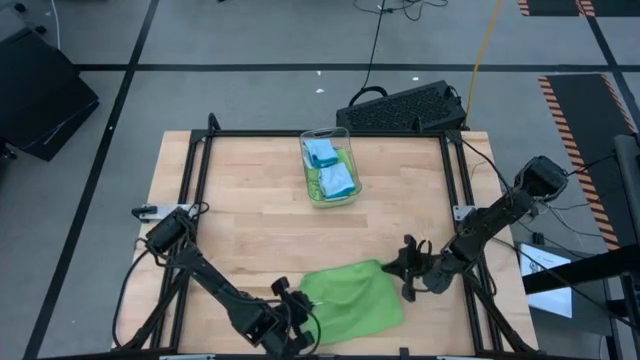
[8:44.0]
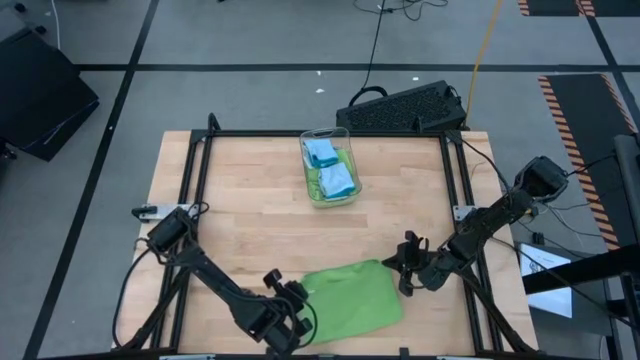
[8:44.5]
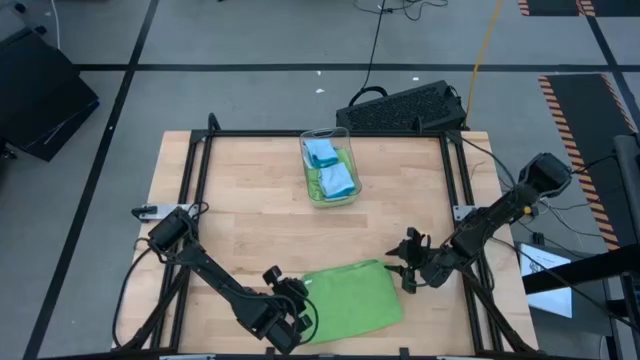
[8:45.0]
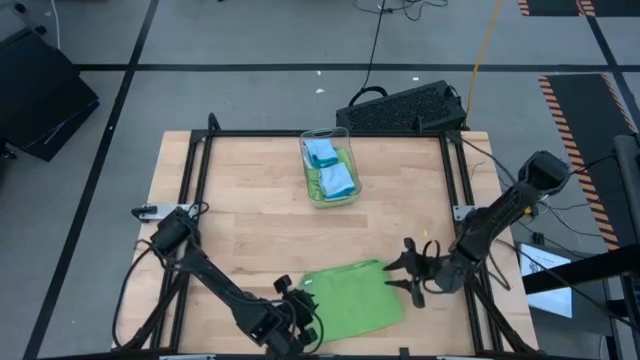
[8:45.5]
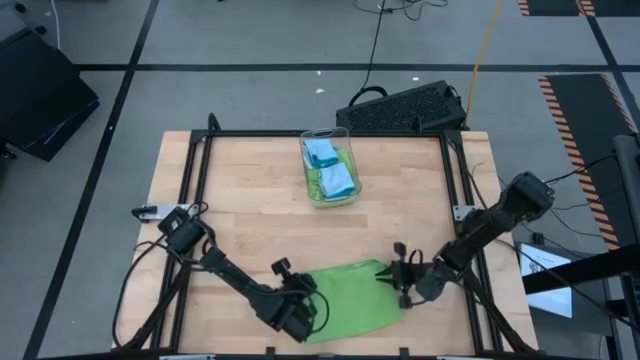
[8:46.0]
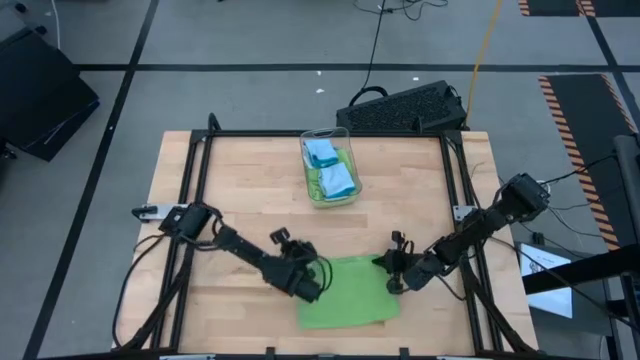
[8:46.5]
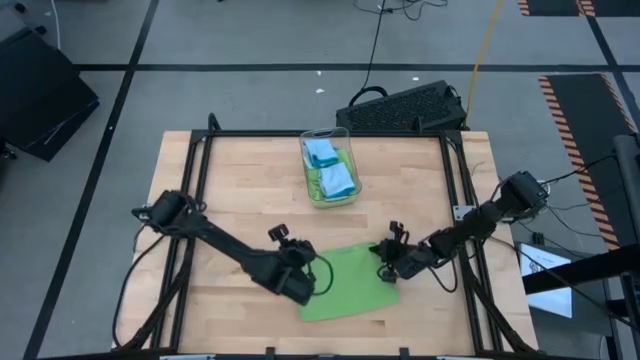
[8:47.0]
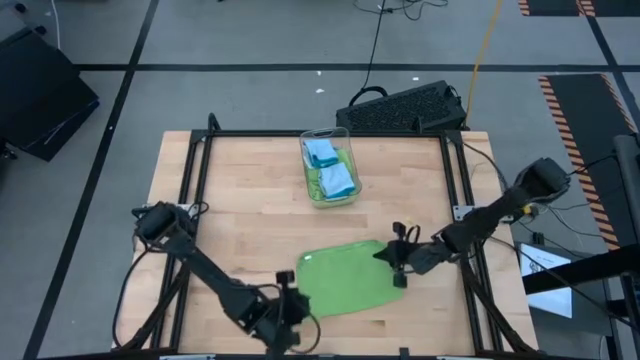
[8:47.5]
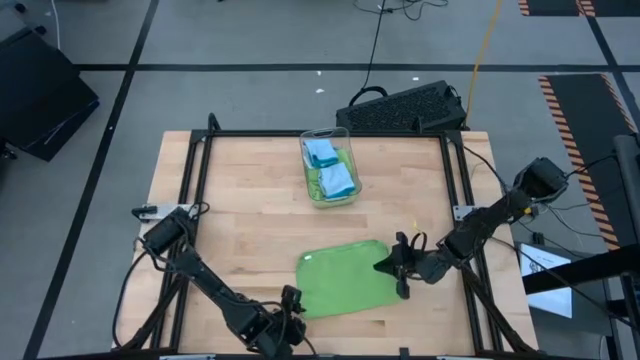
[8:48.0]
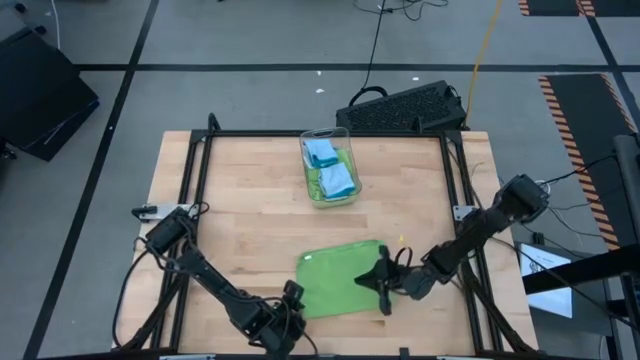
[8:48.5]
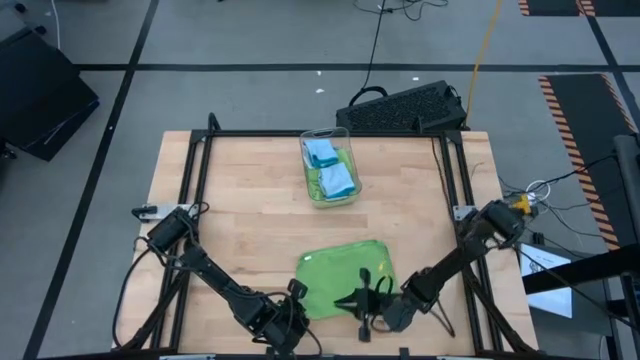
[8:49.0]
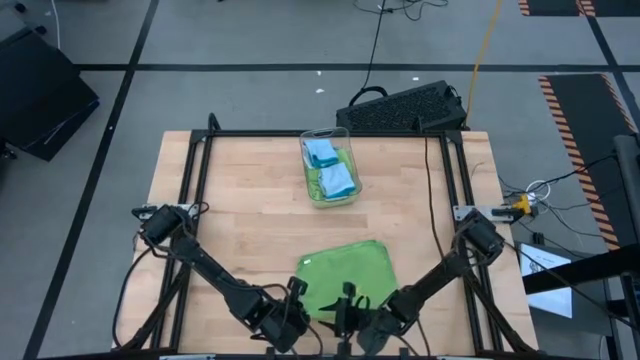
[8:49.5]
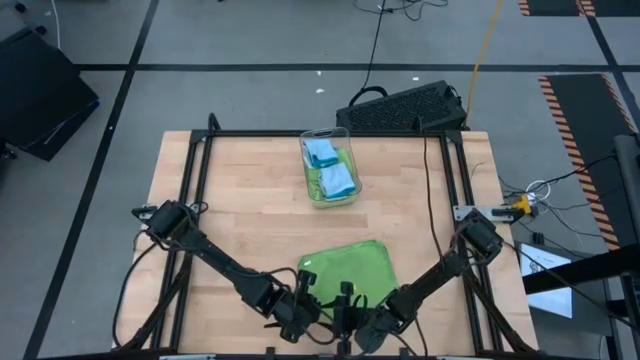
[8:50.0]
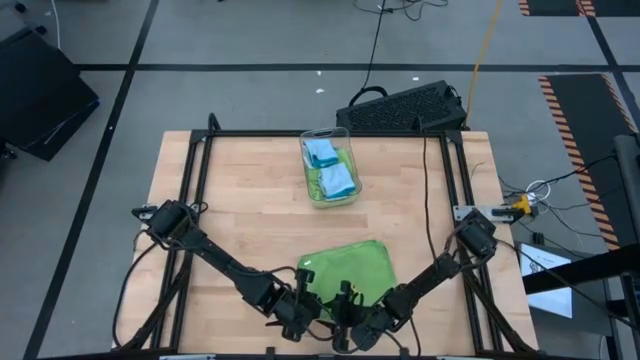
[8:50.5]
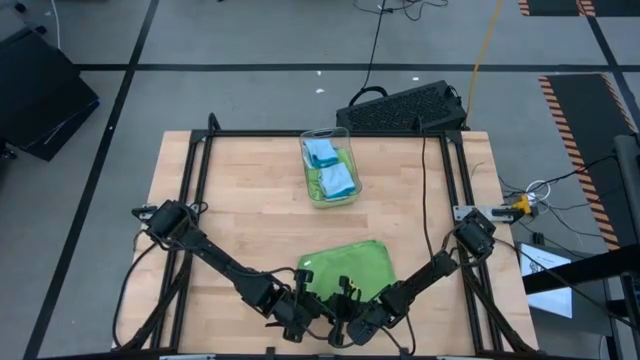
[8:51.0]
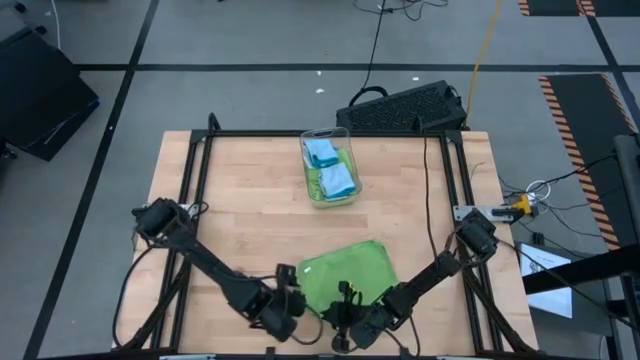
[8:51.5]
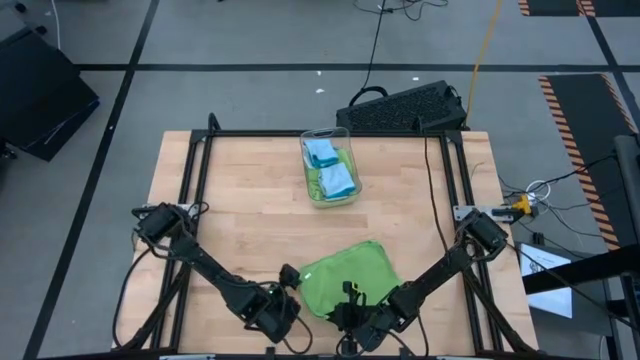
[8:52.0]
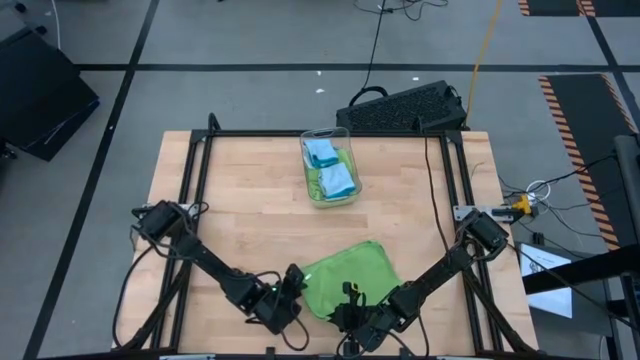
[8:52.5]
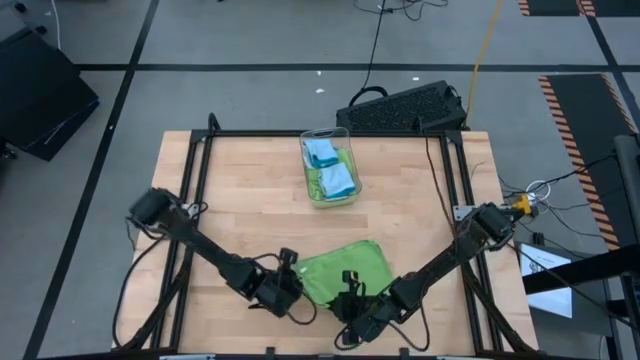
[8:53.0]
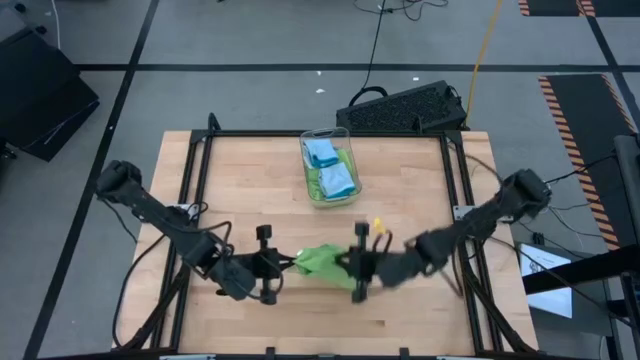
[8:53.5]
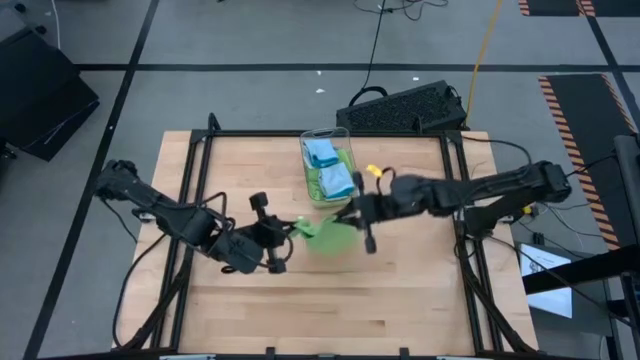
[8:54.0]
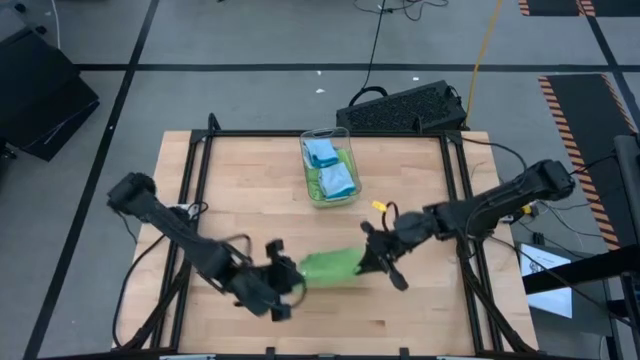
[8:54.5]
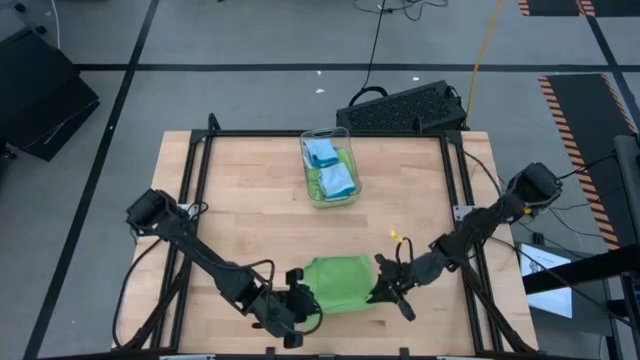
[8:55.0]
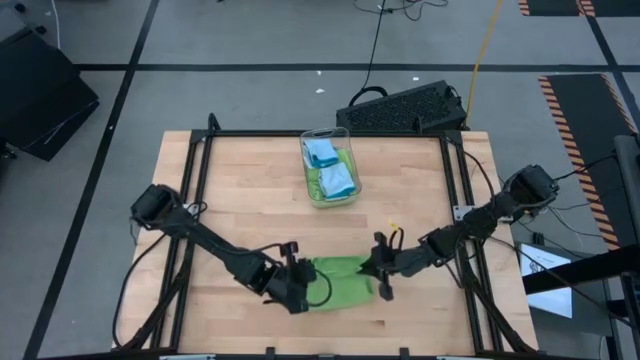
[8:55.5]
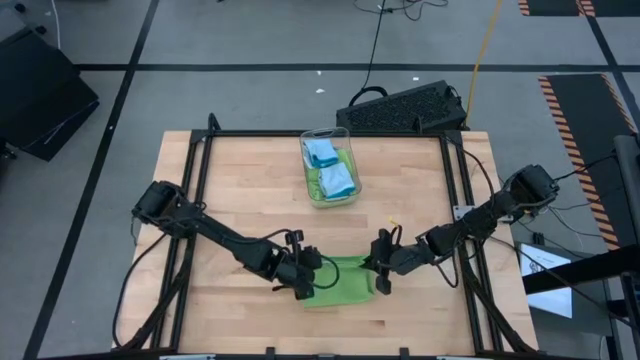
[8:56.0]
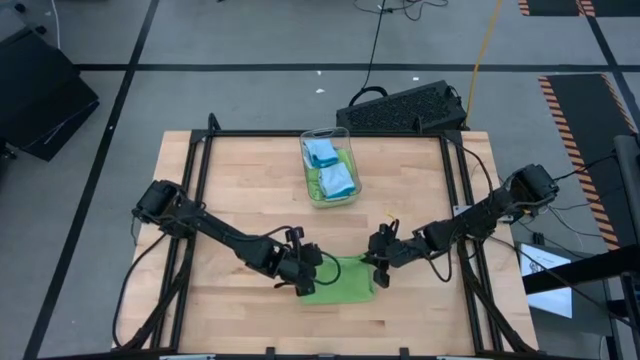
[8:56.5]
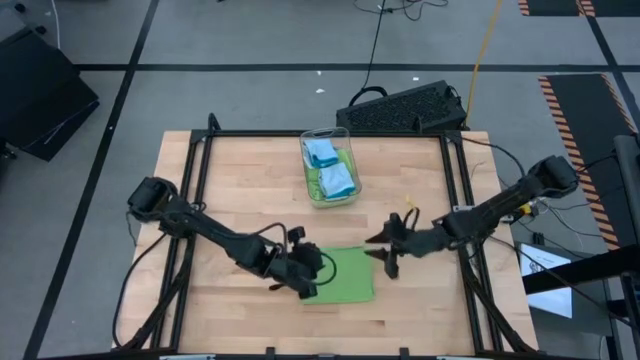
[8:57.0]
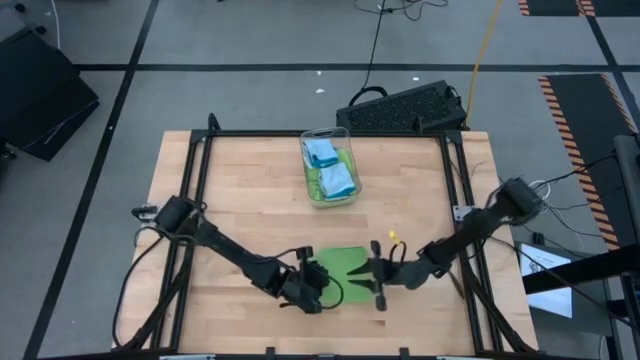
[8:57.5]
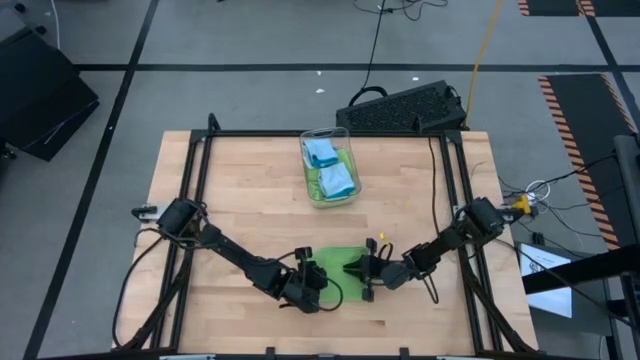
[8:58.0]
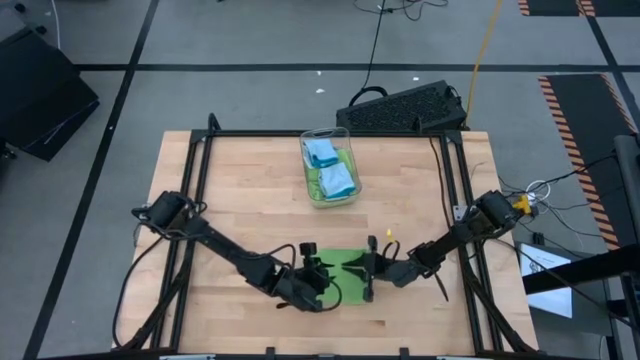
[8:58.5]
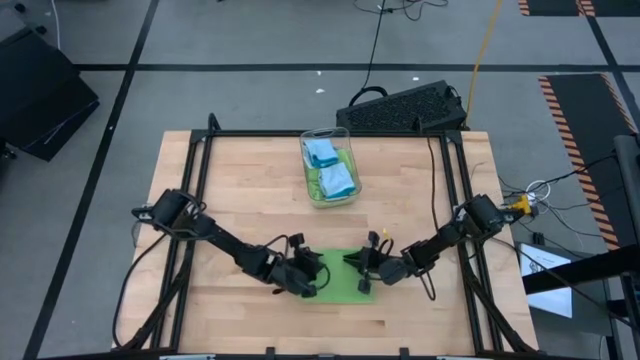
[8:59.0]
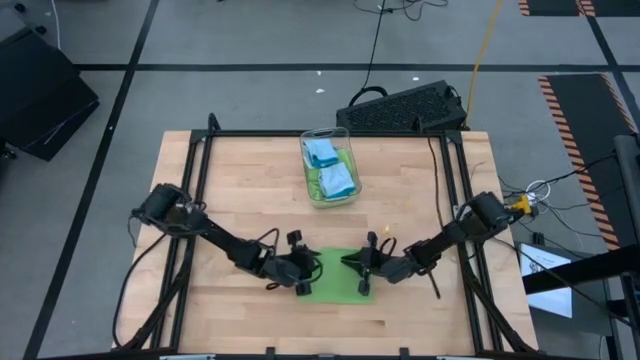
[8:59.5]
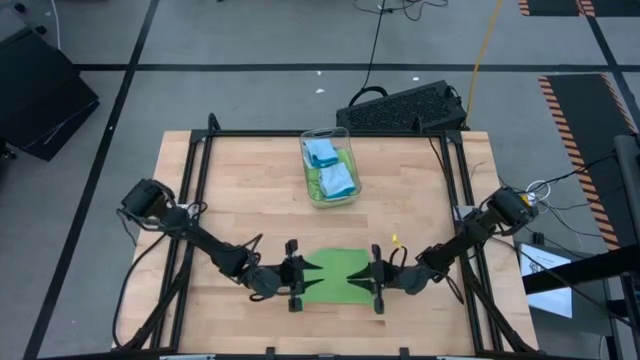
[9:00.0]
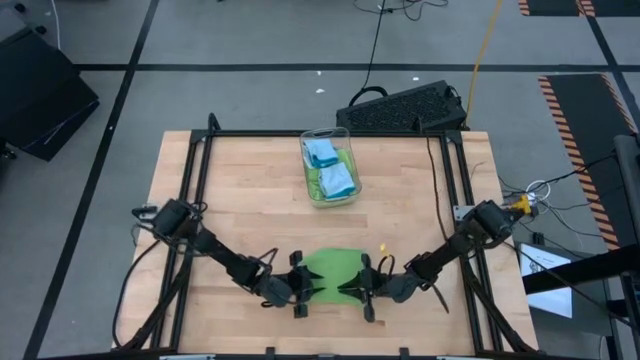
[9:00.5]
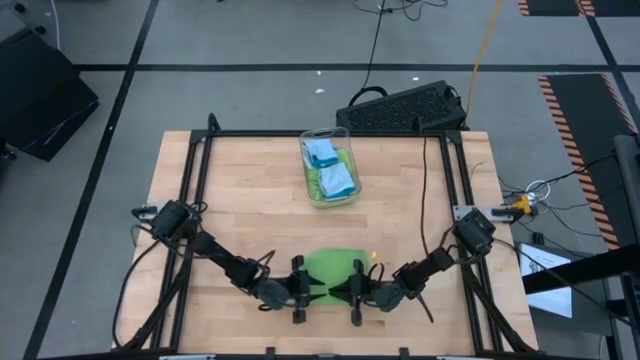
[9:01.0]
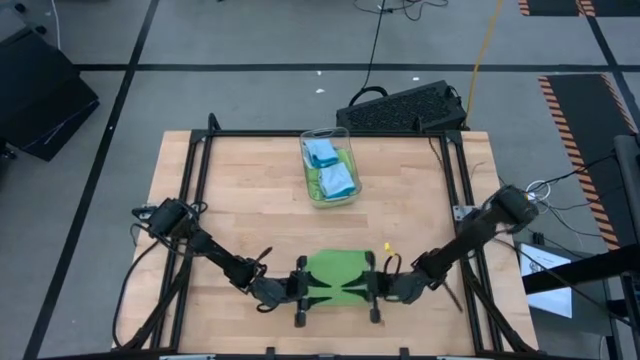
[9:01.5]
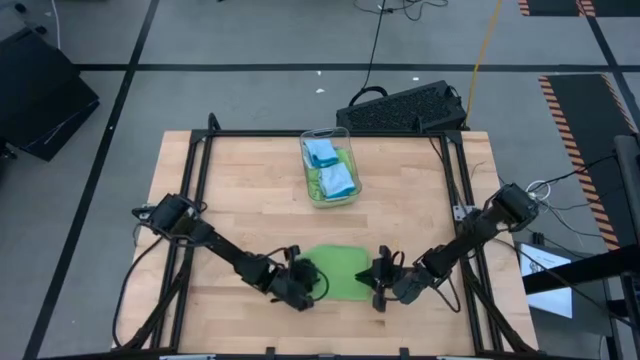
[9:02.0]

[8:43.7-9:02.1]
Task: Fold microfiber towels
Fold the green towel
